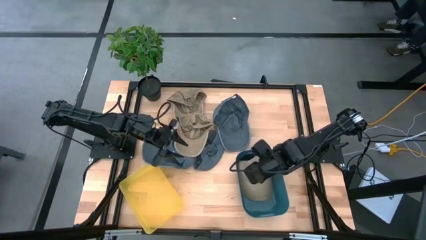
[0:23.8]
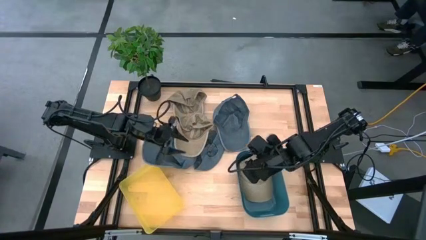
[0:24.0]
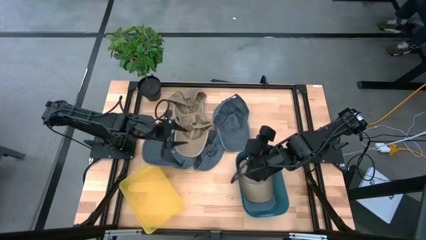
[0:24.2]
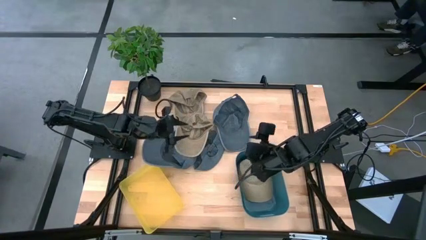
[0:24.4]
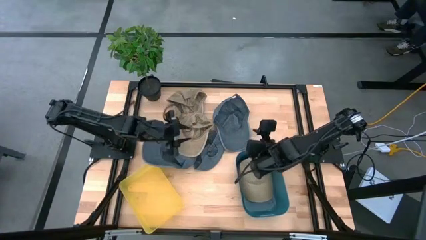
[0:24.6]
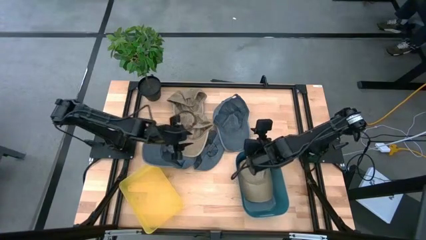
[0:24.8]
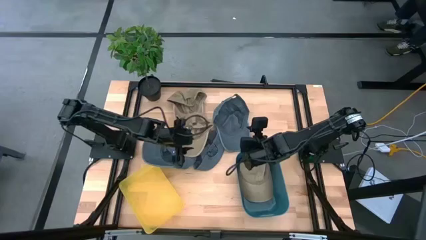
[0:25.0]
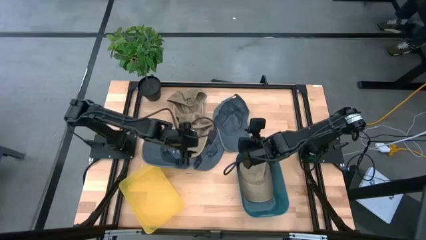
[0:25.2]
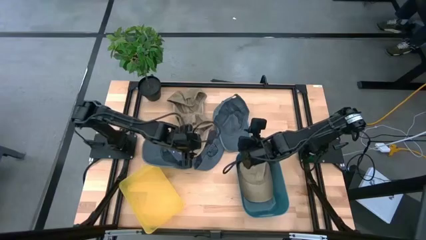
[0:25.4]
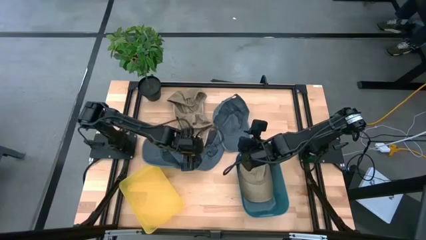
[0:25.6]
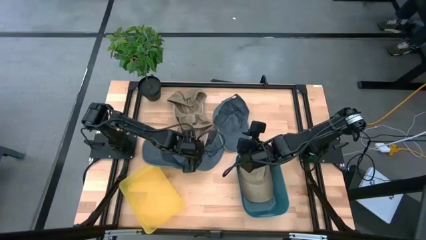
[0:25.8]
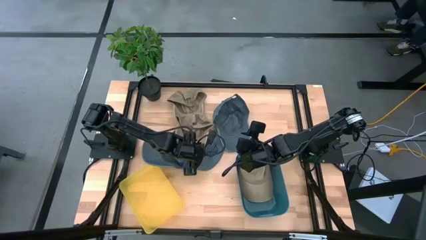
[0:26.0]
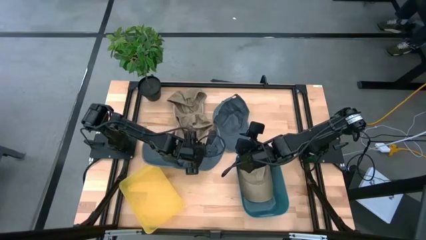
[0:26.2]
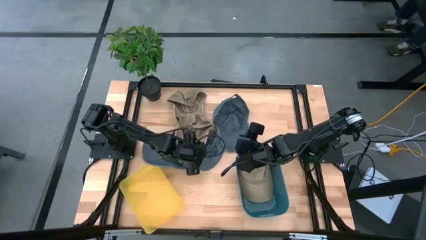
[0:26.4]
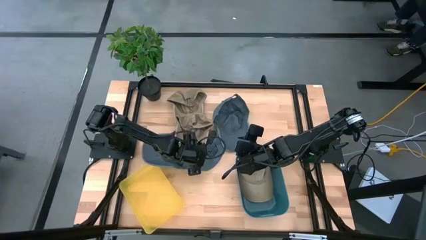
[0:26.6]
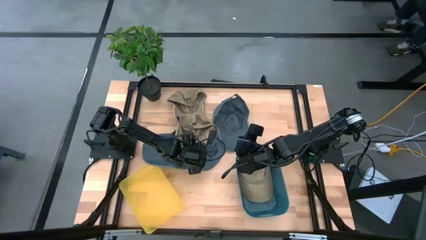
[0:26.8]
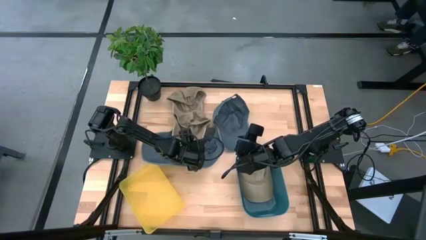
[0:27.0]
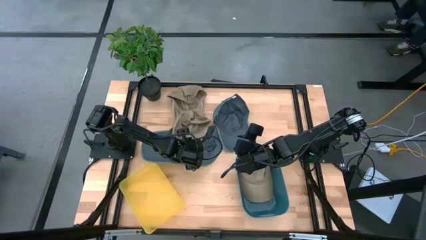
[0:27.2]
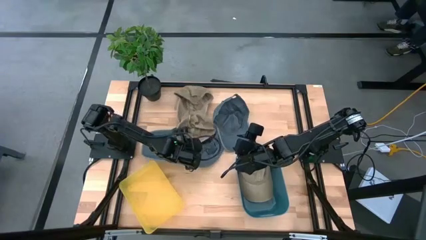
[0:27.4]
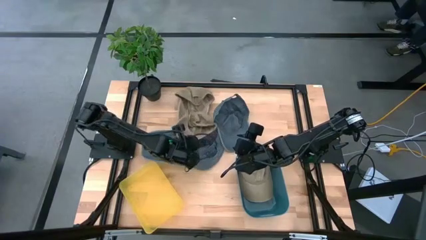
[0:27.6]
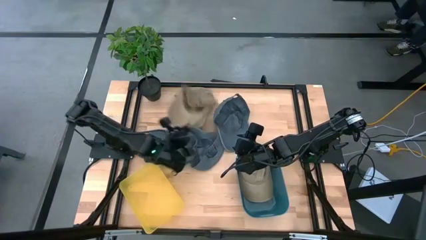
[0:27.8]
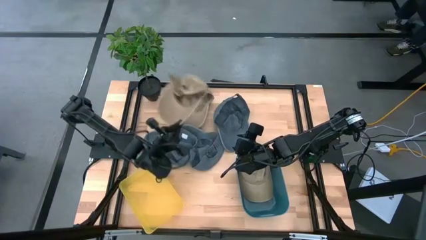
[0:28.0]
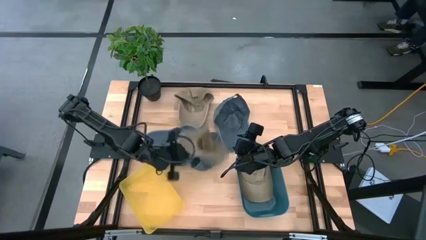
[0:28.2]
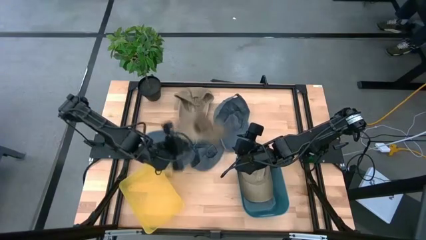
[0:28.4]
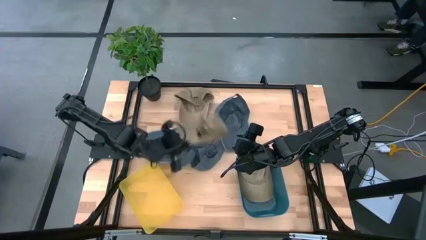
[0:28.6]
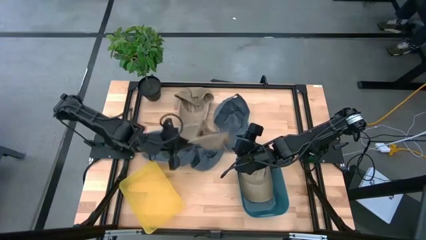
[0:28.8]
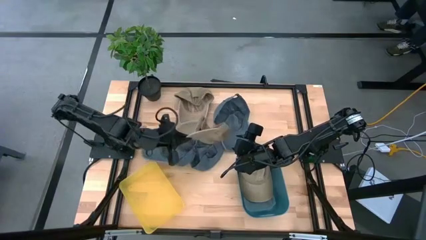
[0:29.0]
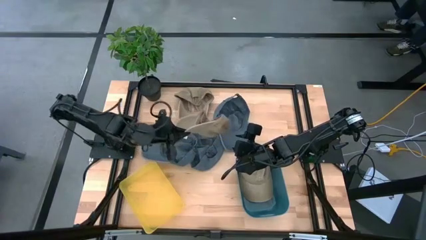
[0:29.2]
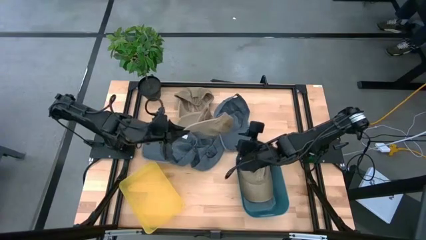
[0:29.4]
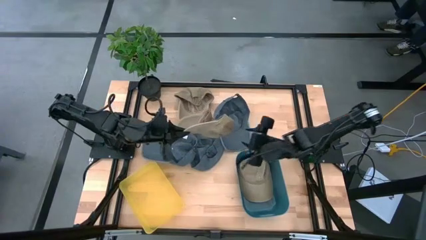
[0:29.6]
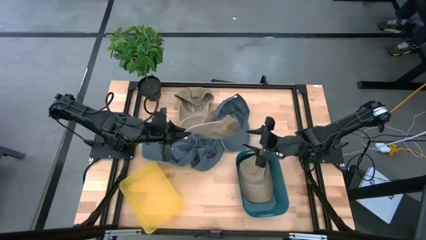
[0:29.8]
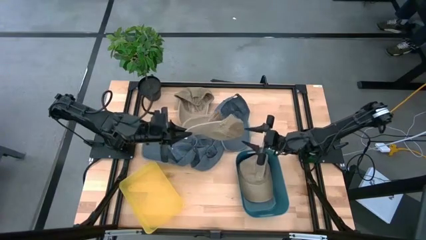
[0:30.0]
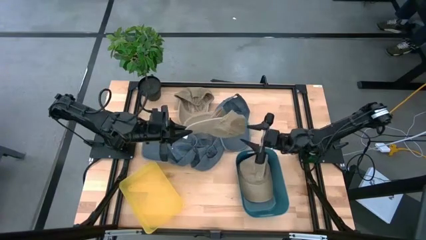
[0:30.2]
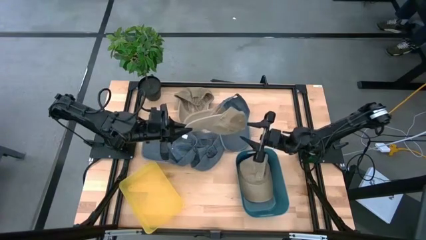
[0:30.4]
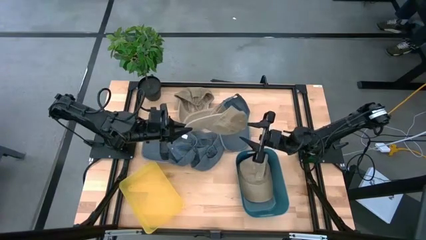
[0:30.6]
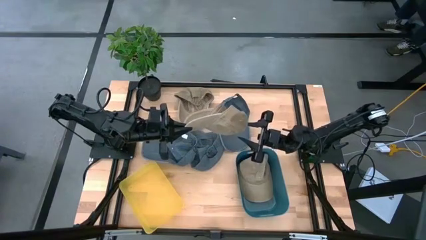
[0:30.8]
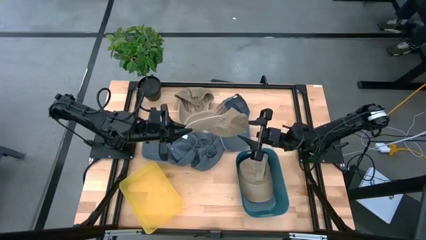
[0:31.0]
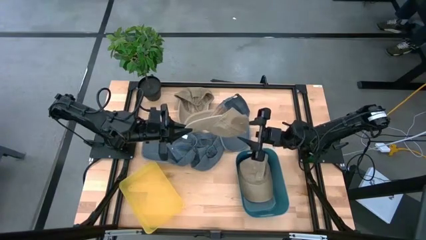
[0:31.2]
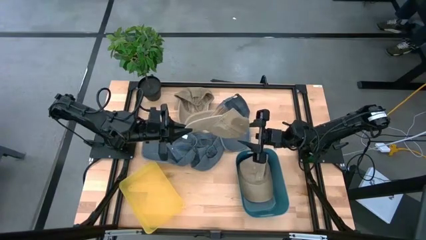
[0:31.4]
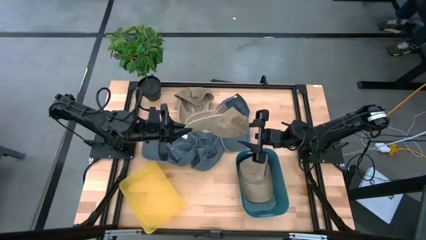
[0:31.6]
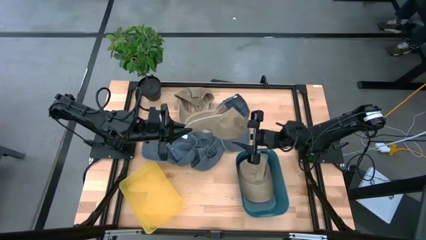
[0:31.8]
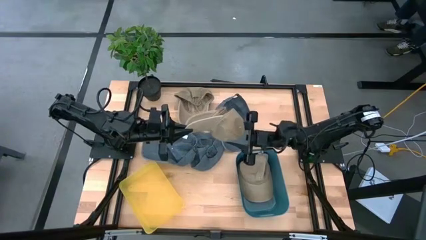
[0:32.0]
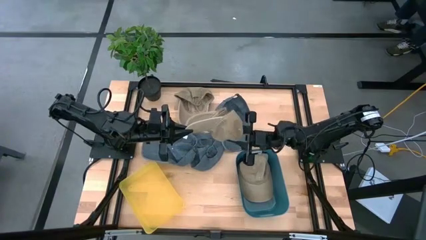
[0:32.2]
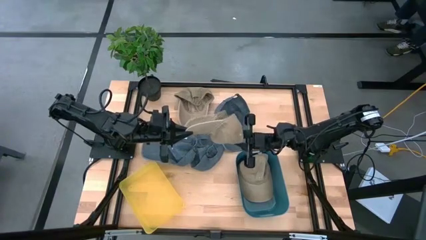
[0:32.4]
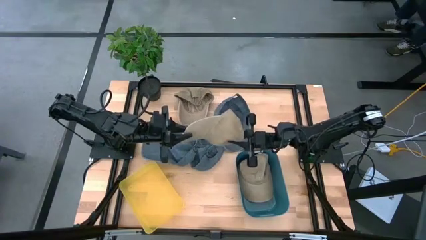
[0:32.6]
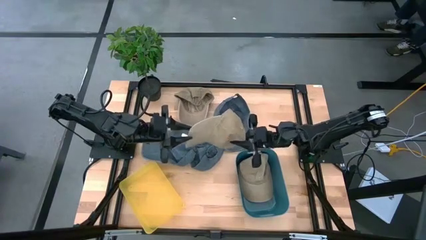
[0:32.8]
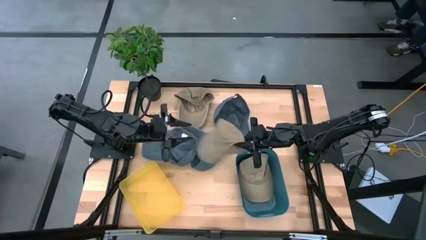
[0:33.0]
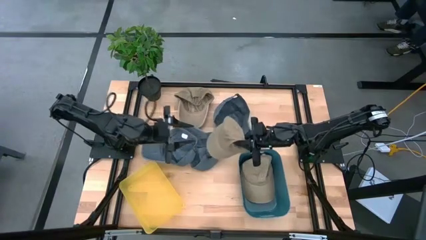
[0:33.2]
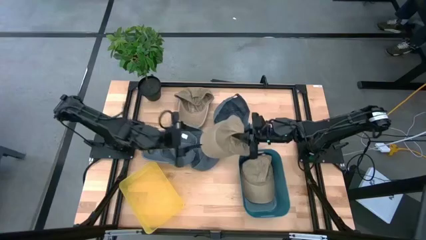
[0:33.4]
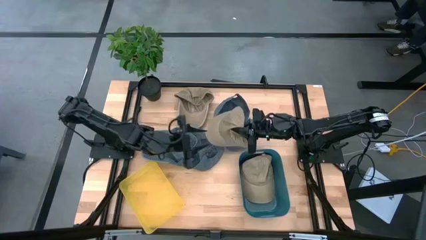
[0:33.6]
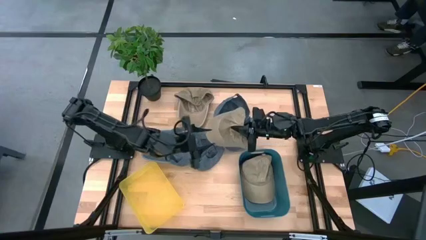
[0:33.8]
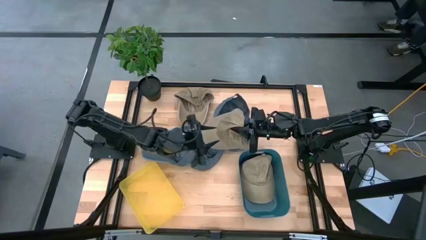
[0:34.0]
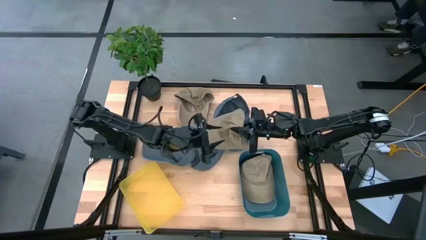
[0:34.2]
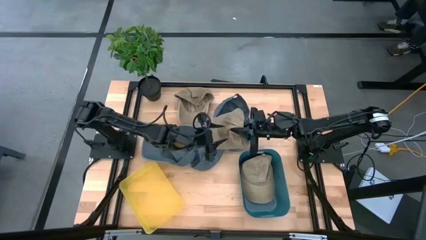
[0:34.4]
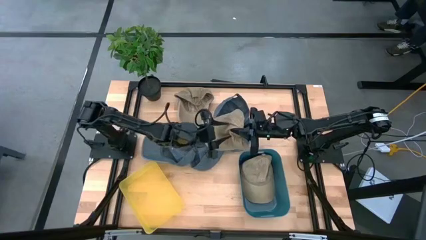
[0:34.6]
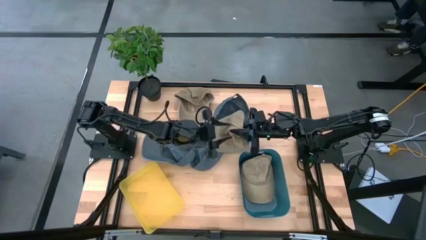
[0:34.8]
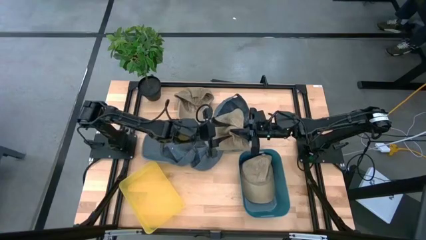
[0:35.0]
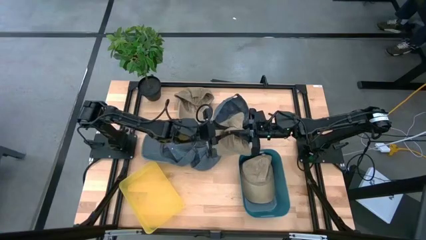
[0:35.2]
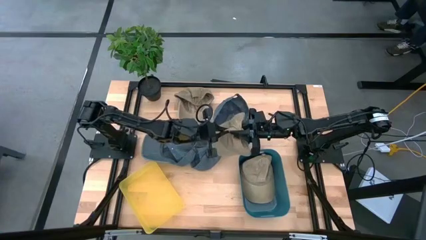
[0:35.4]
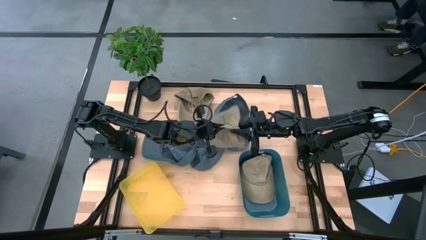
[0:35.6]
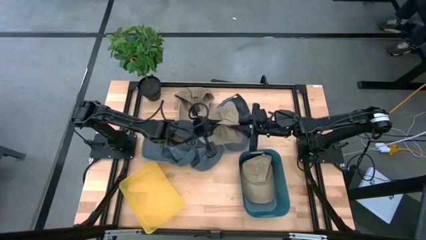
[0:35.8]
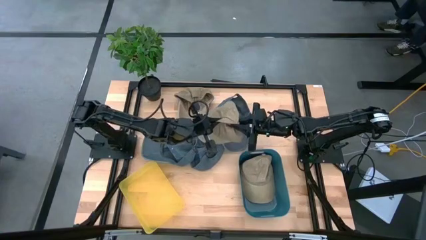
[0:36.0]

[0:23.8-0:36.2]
Task: Pick & Place hat
Put the bottom brown cap into the blue bin

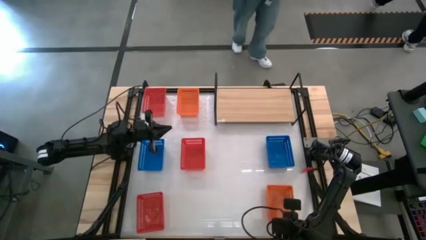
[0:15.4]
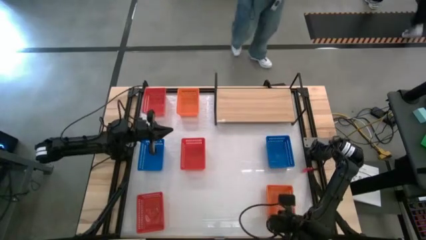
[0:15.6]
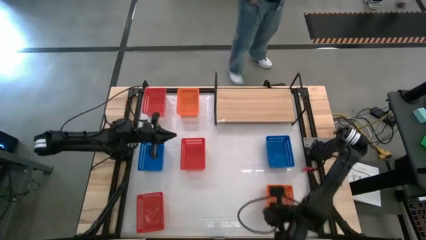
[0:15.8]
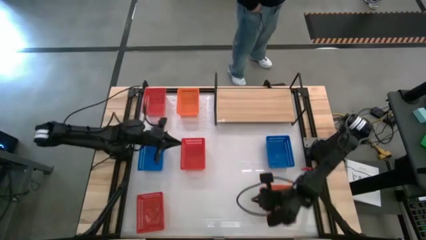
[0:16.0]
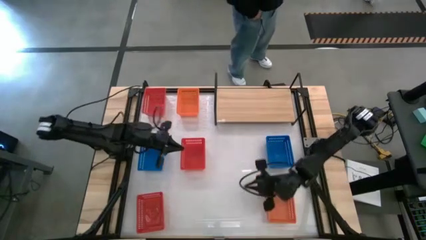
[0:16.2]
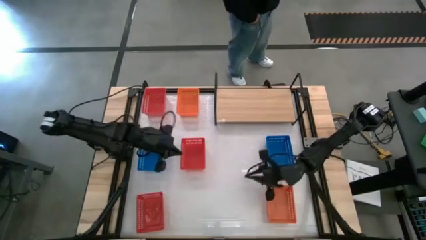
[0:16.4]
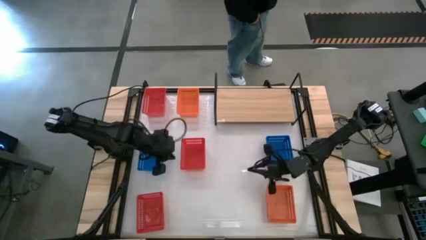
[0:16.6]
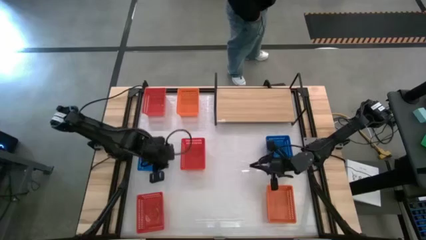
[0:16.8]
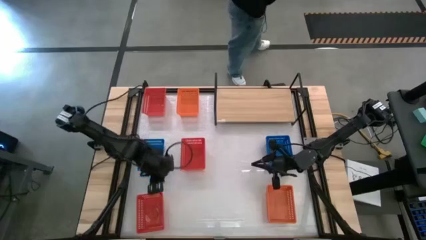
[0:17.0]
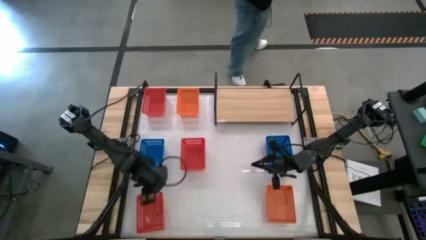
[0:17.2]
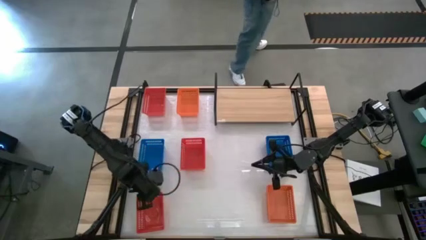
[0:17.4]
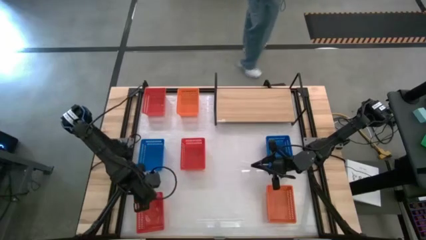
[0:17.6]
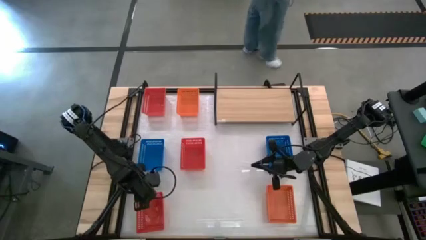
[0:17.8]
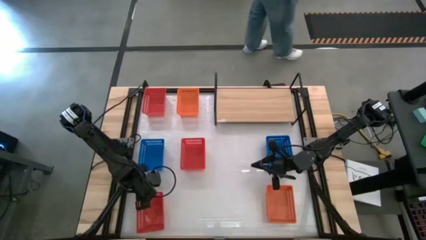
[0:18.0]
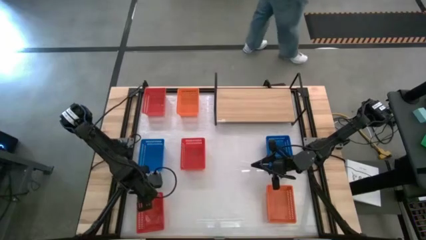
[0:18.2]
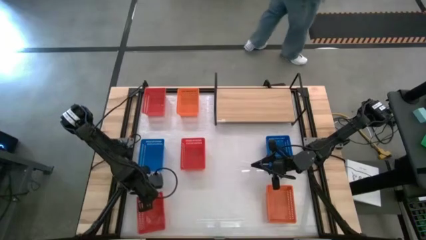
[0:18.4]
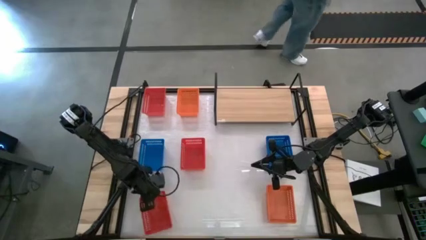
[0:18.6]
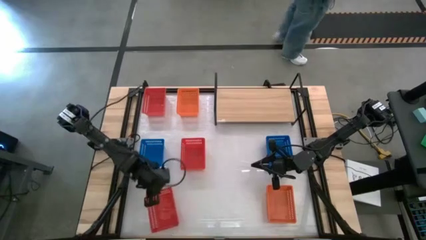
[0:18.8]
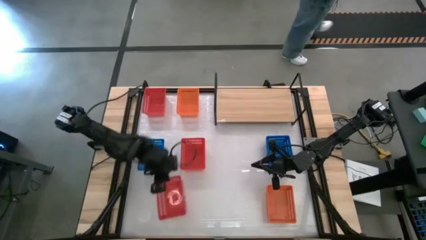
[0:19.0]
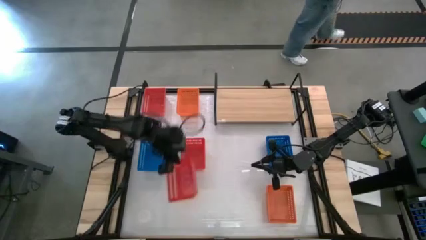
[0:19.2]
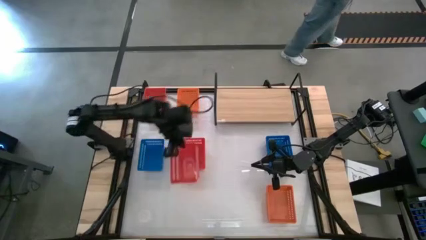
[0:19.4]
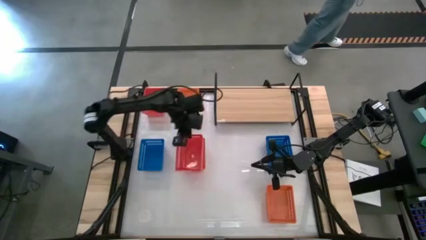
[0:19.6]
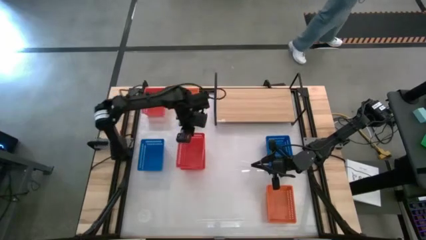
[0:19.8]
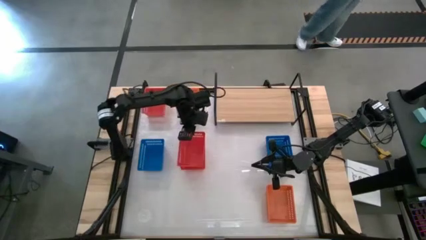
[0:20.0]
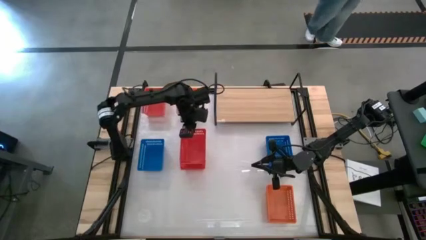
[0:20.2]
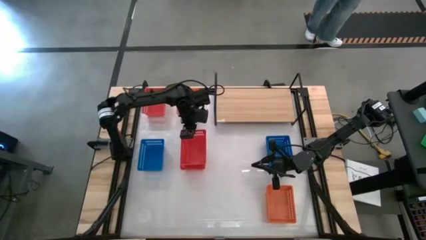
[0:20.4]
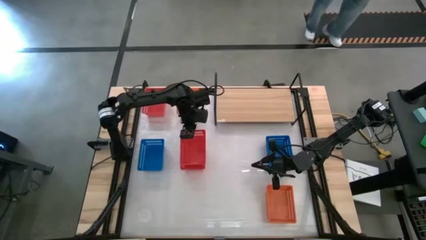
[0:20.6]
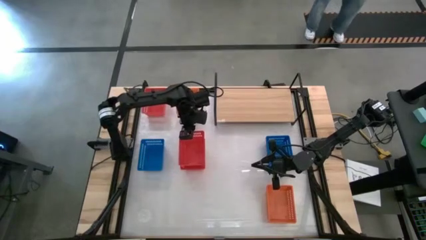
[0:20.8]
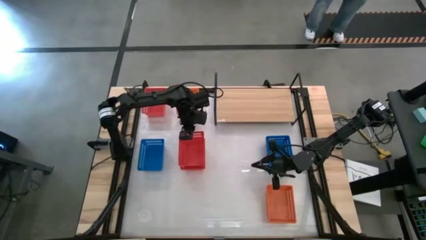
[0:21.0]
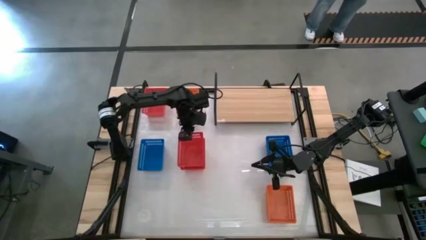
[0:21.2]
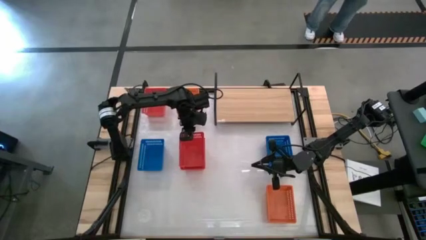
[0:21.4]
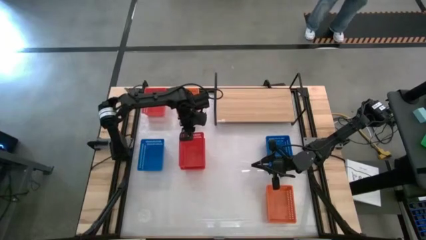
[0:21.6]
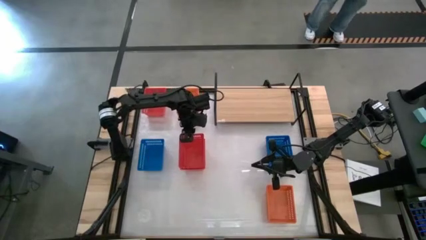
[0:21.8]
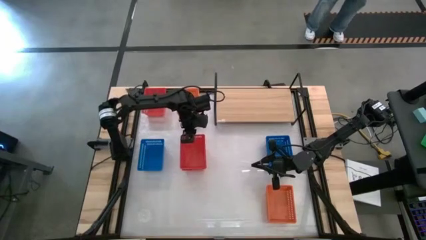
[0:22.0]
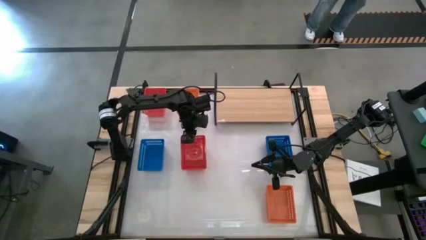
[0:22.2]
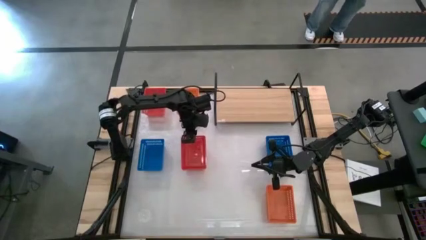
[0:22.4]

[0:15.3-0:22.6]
Task: Stack baskets on shelf by color
Stack the bottom red basket on top of the middle red basket
